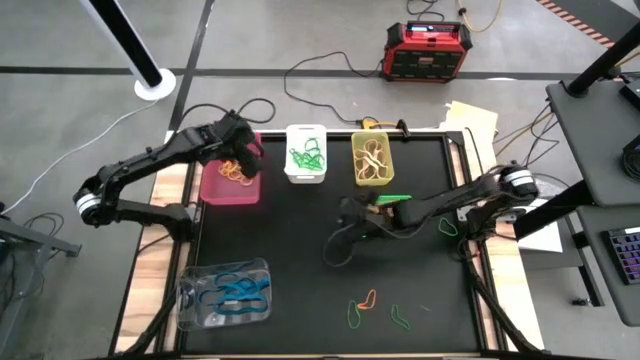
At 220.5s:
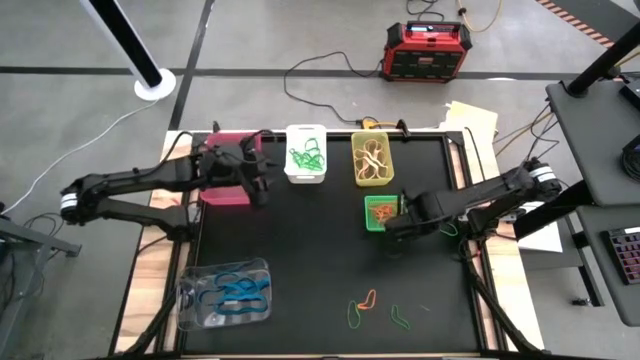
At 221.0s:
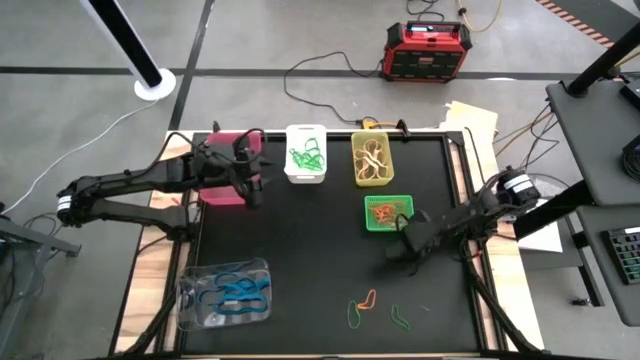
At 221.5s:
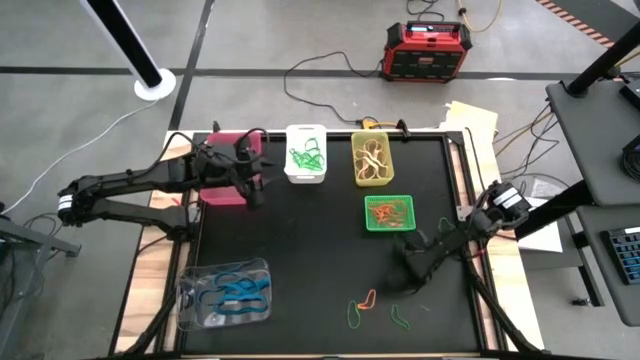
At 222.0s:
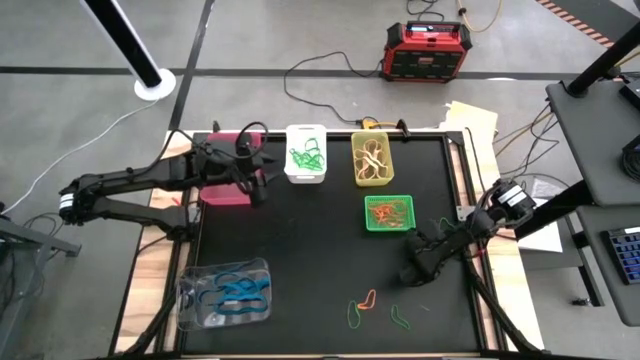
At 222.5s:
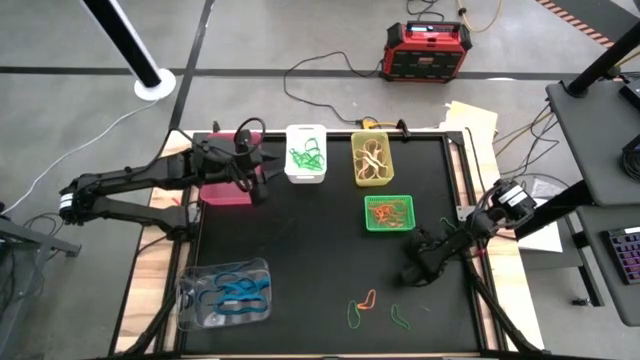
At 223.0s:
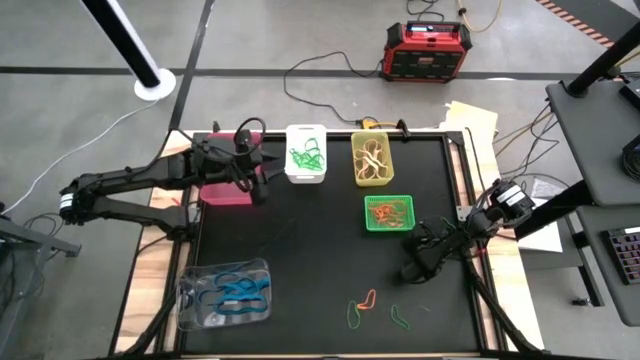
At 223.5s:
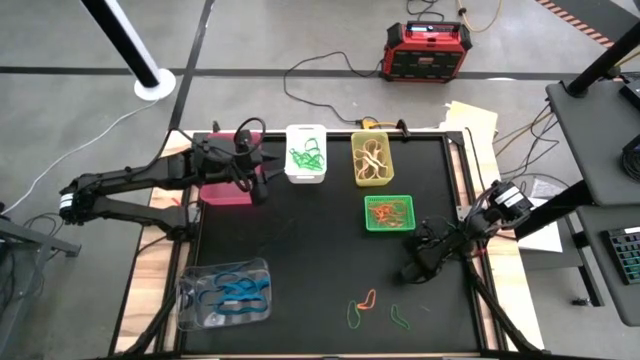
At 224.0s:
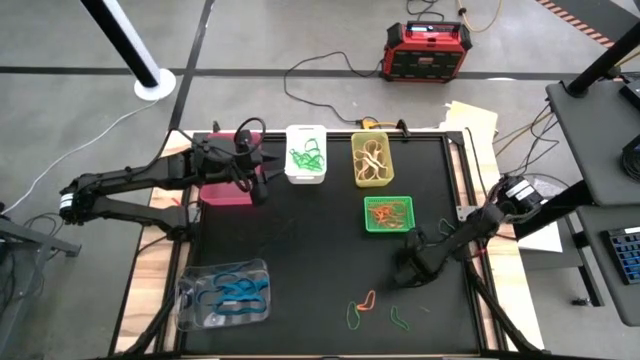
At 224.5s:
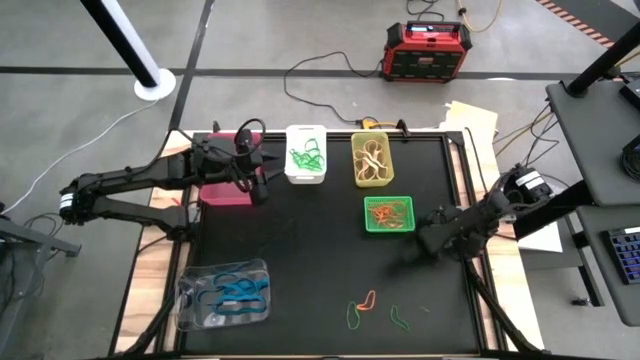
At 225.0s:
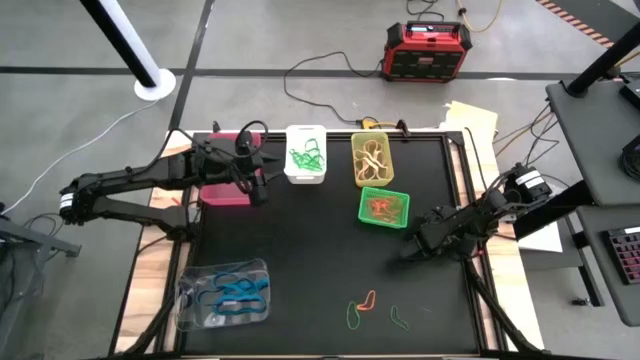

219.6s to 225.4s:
Task: Sort rubber bands into baskets
Put the green rubber band into the white bin

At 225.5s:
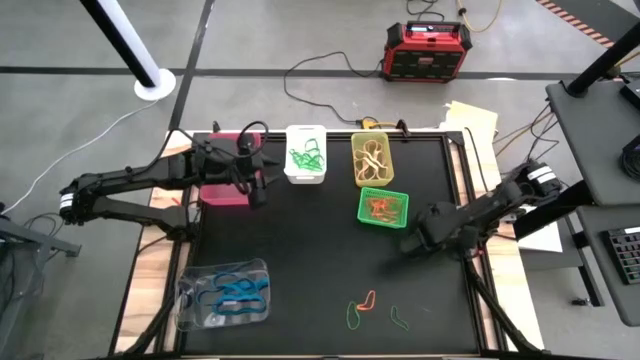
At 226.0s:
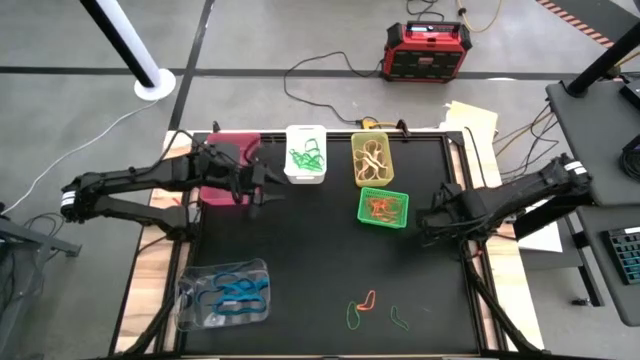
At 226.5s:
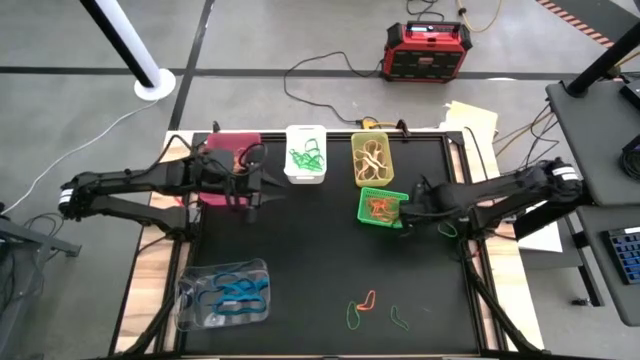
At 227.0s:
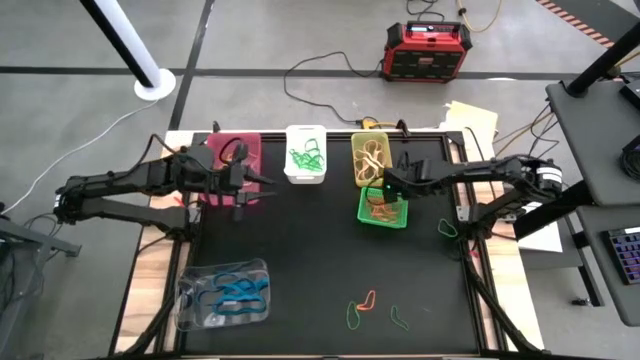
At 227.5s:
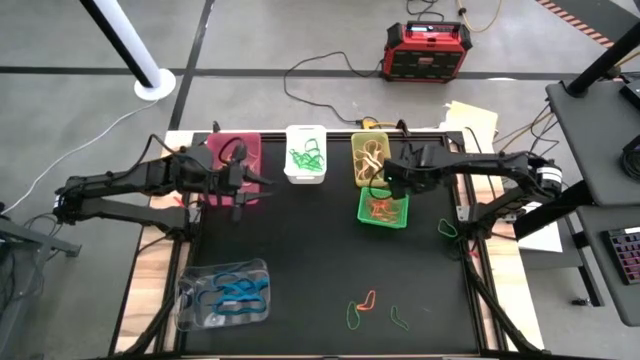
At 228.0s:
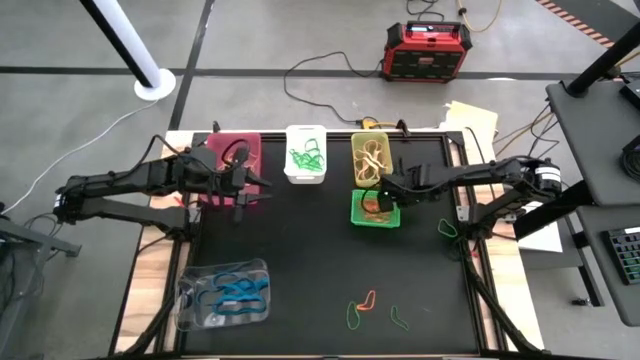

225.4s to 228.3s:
Adjust the green bin

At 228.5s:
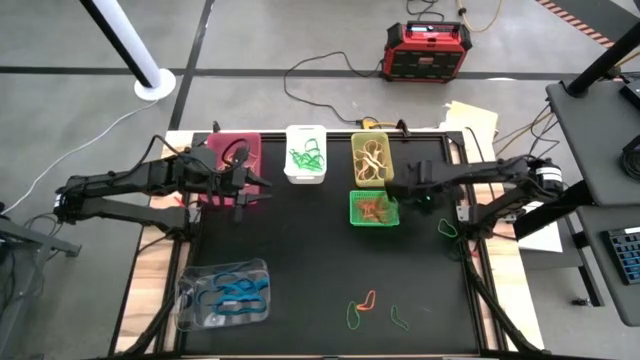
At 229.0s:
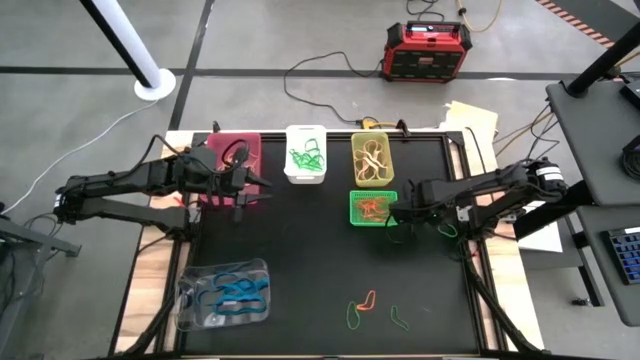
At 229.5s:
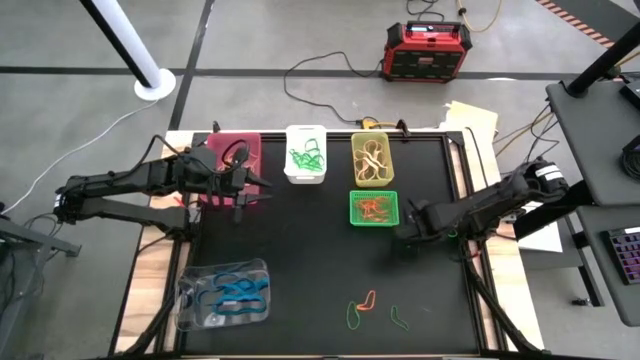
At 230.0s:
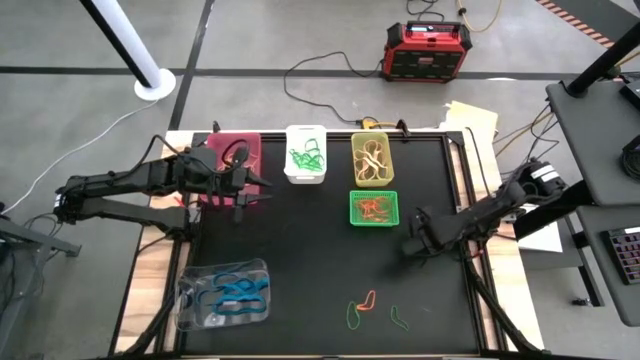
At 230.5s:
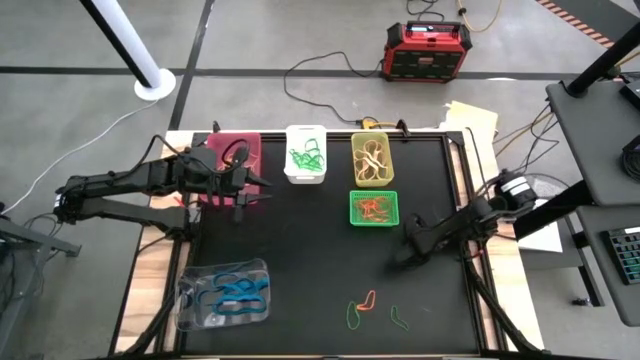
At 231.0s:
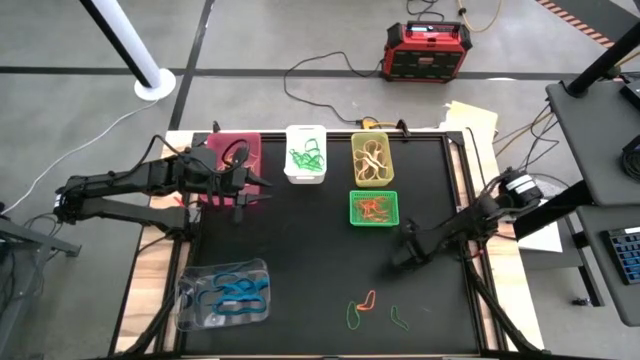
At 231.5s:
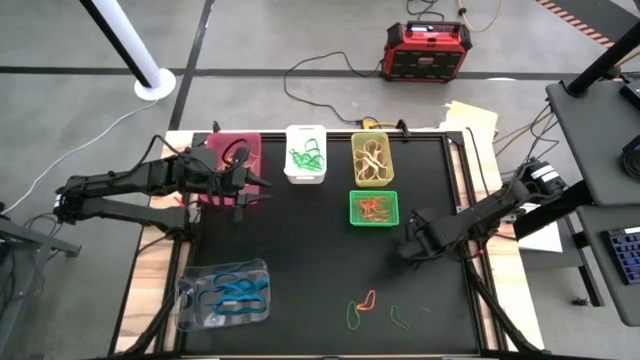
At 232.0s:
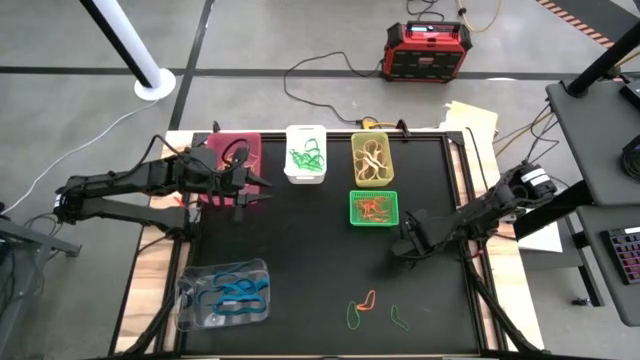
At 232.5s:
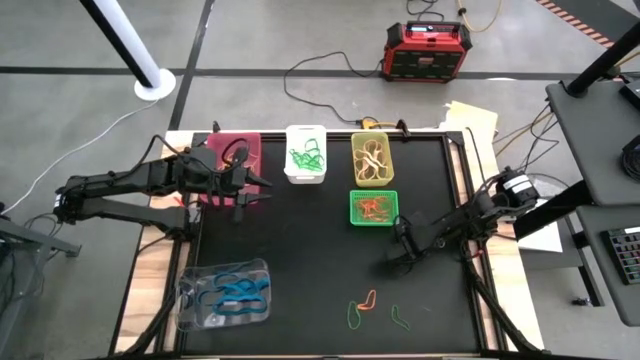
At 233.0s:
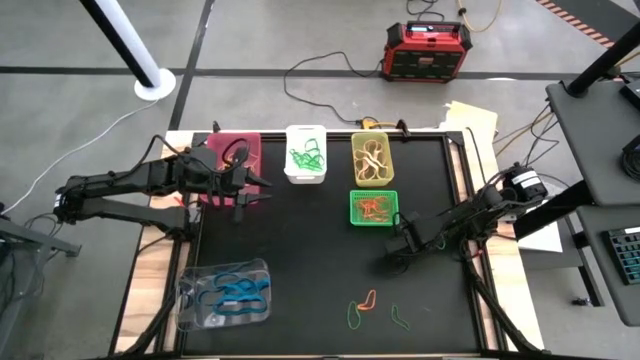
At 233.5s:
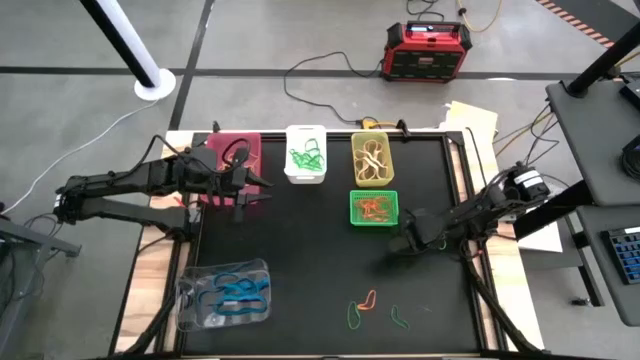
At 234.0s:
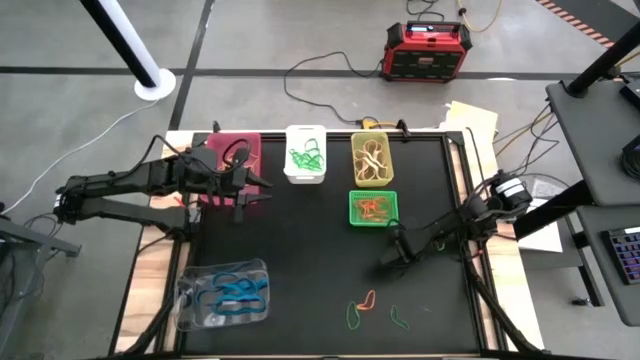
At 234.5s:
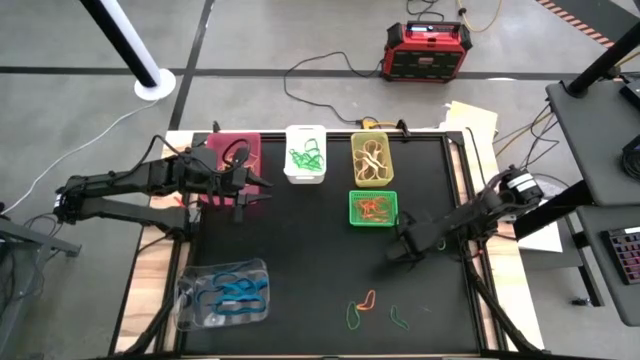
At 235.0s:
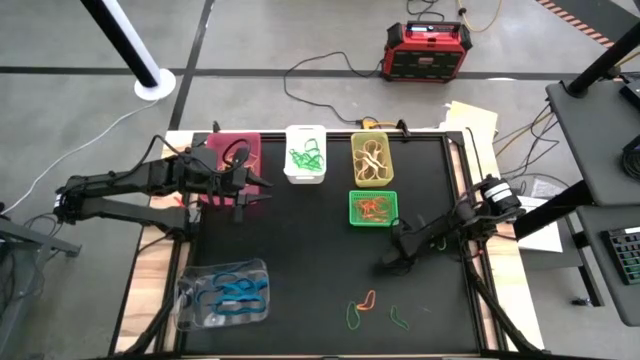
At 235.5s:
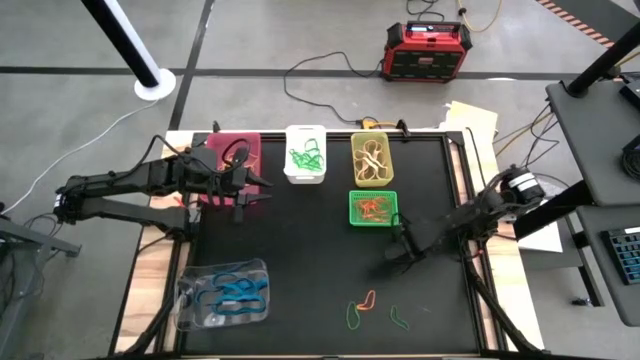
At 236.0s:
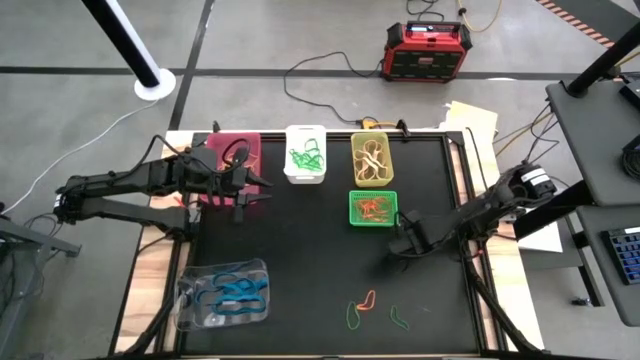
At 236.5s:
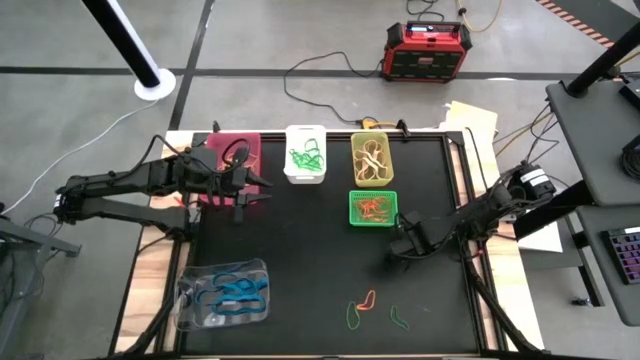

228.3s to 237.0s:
Put the green rubber band into the white bin

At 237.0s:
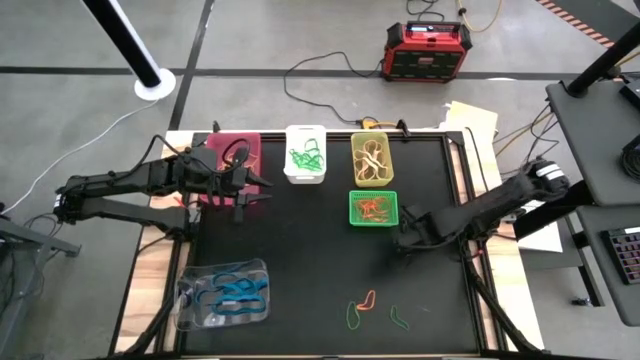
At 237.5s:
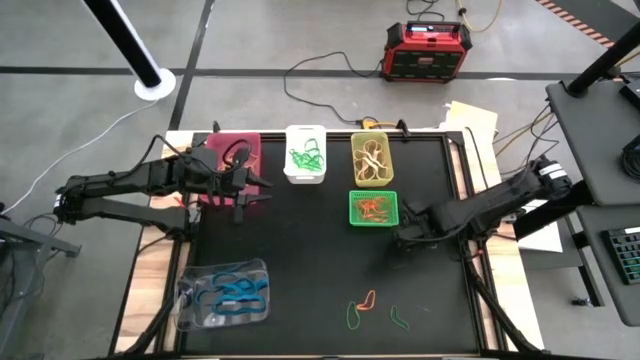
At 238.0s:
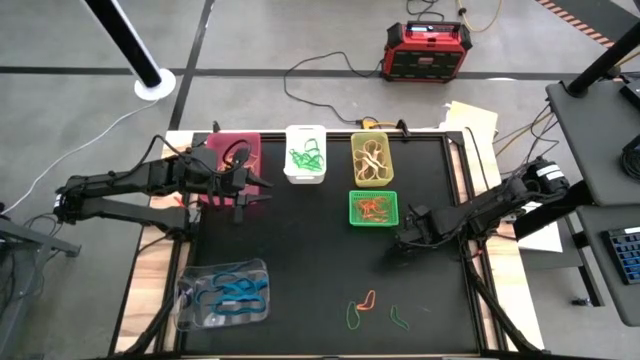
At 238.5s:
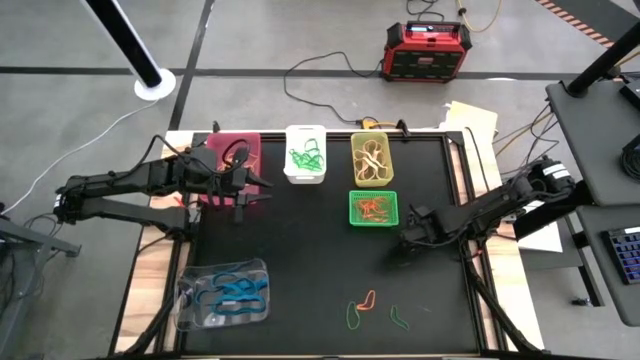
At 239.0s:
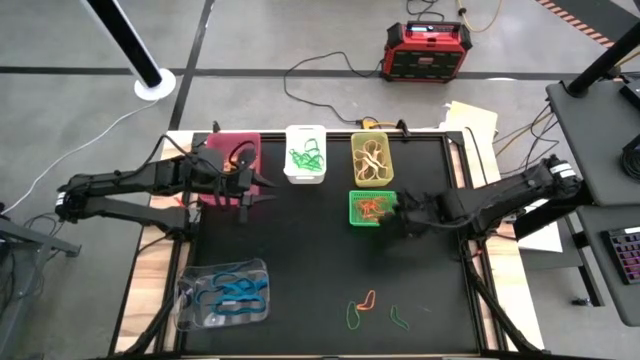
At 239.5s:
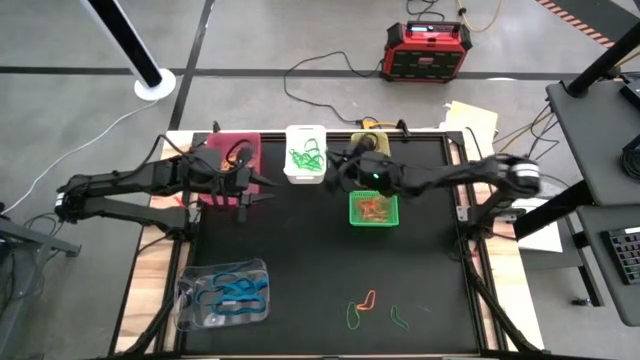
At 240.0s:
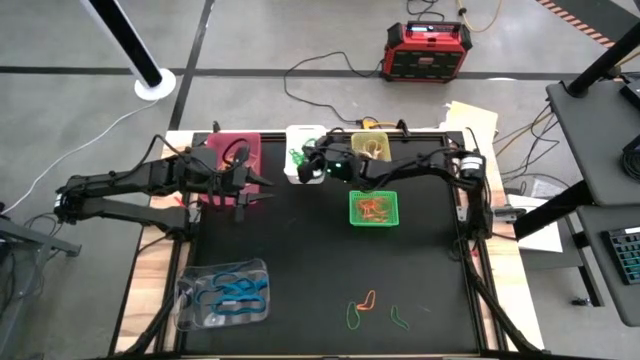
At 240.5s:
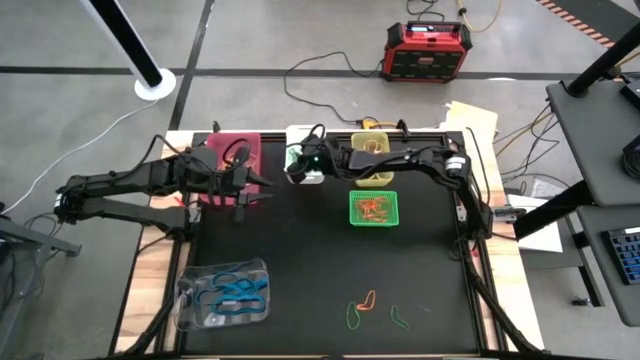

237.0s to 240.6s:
Put the green rubber band into the white bin

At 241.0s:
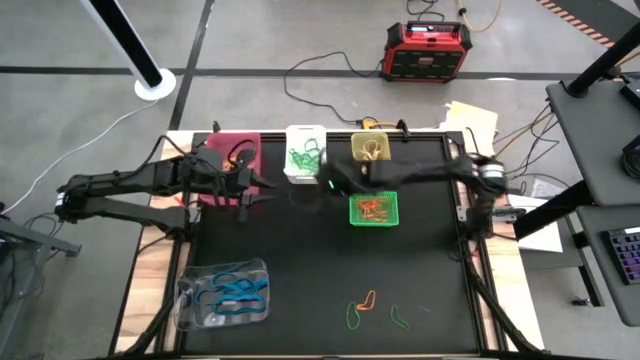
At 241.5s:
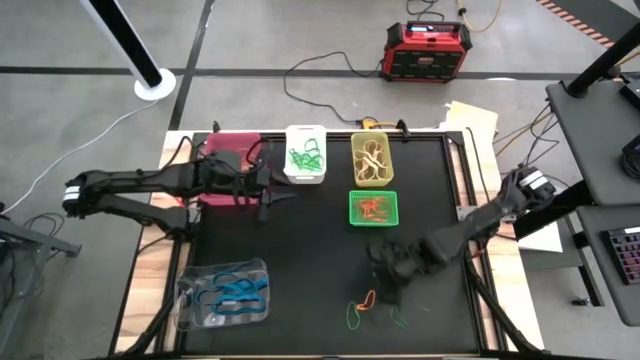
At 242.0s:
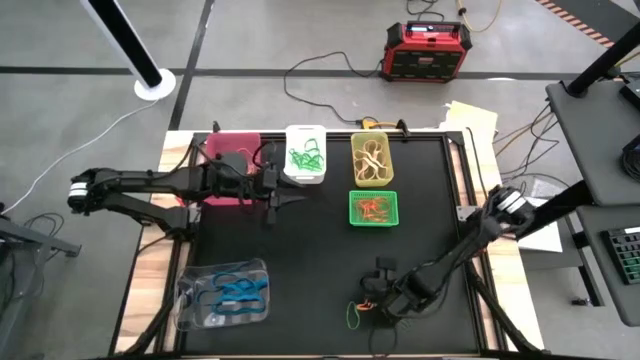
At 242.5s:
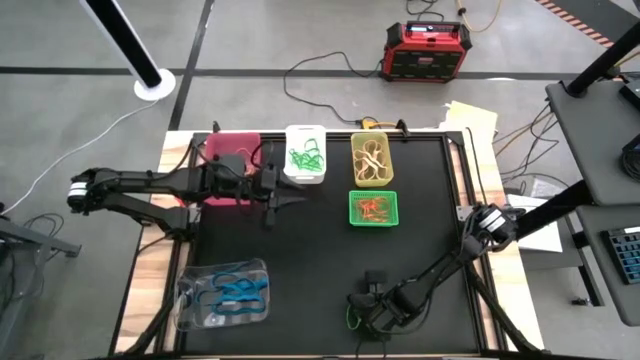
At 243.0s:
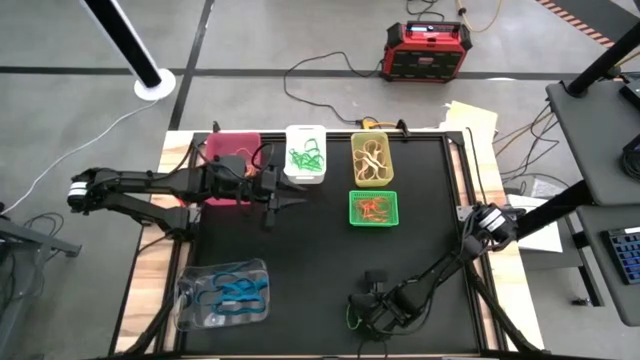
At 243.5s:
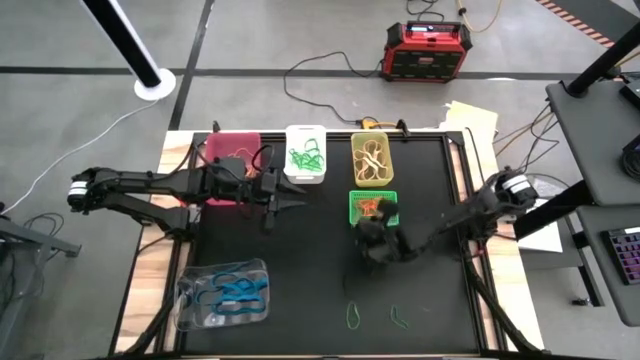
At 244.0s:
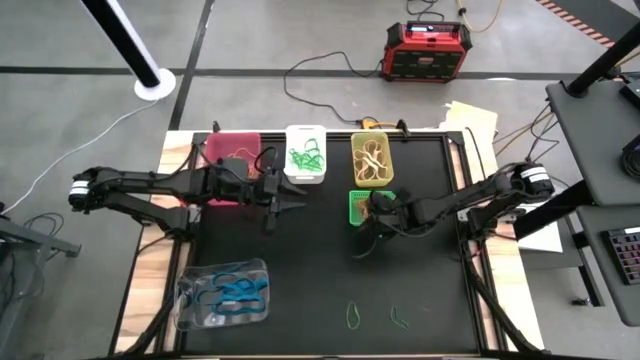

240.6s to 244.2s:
Put the orange rubber band into the green bin
